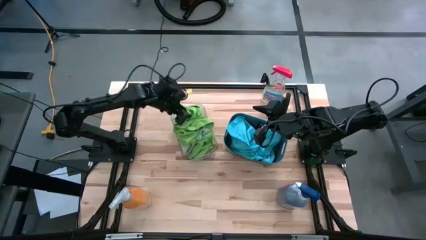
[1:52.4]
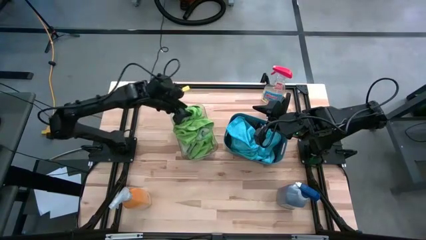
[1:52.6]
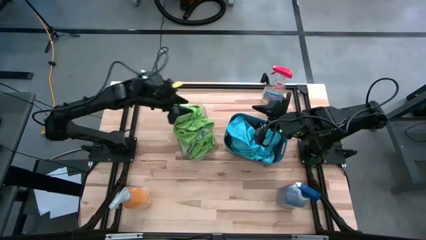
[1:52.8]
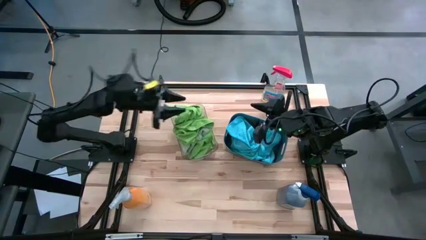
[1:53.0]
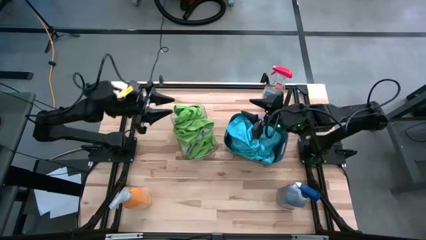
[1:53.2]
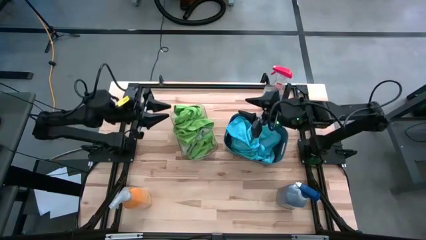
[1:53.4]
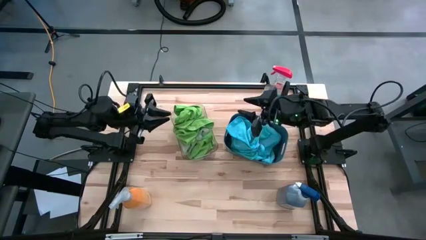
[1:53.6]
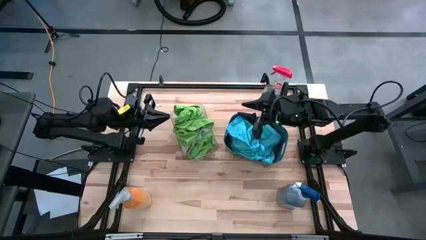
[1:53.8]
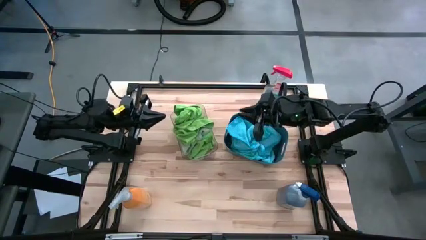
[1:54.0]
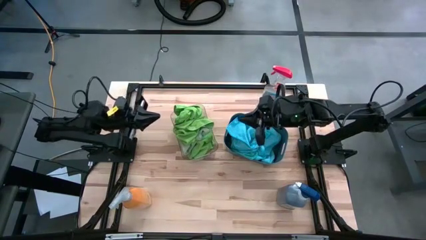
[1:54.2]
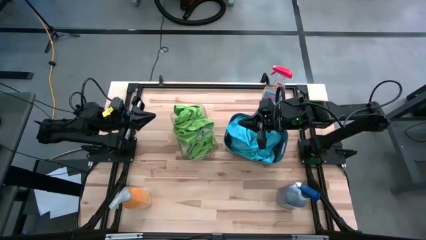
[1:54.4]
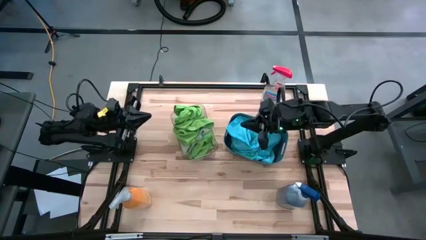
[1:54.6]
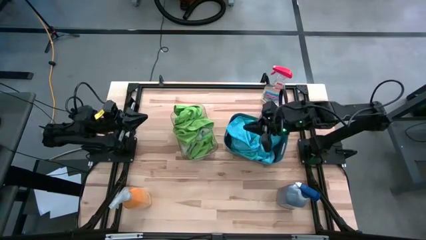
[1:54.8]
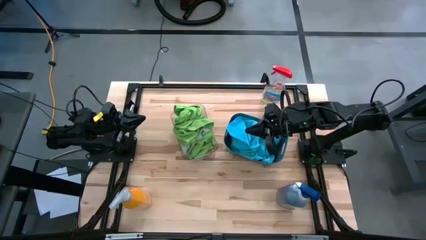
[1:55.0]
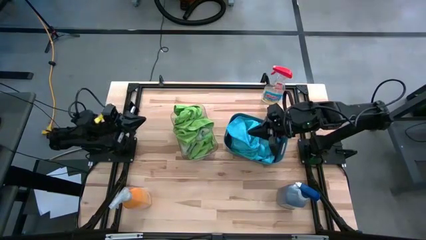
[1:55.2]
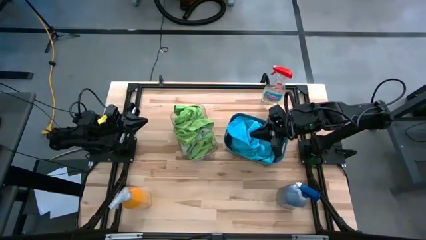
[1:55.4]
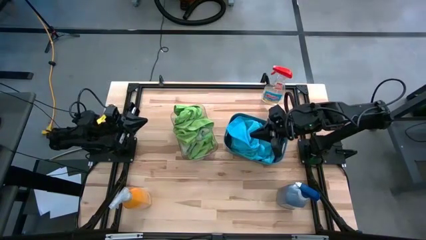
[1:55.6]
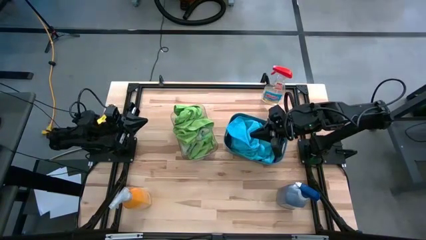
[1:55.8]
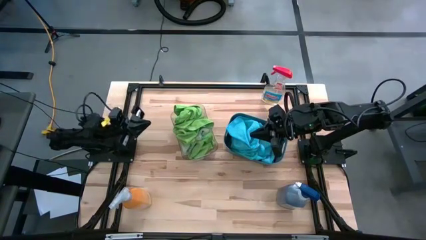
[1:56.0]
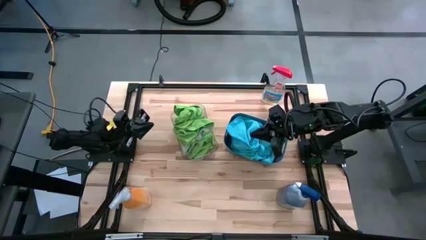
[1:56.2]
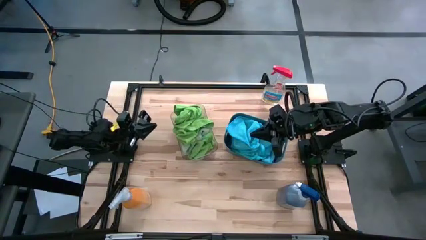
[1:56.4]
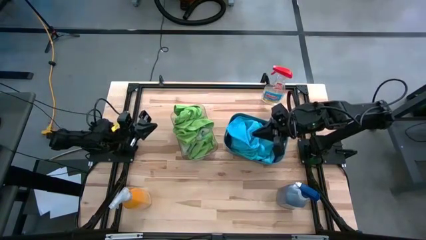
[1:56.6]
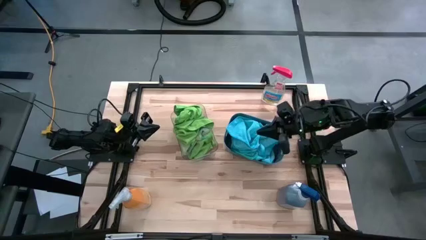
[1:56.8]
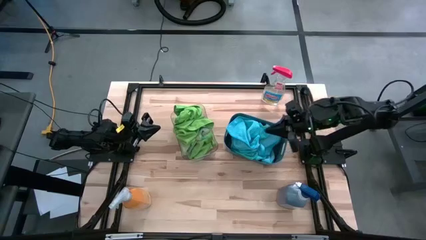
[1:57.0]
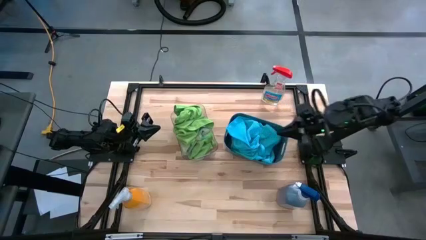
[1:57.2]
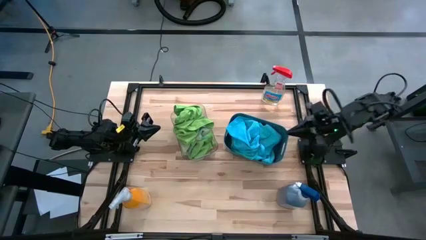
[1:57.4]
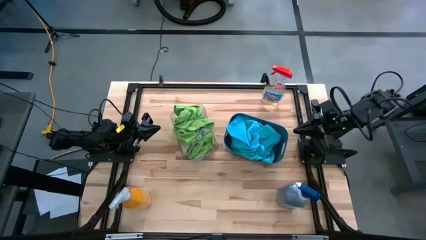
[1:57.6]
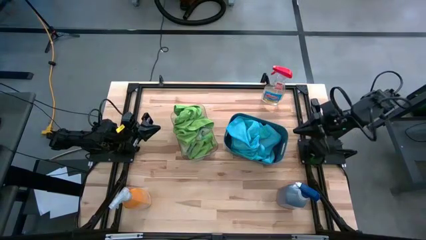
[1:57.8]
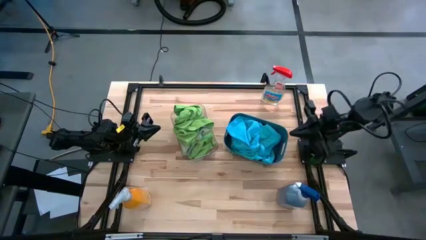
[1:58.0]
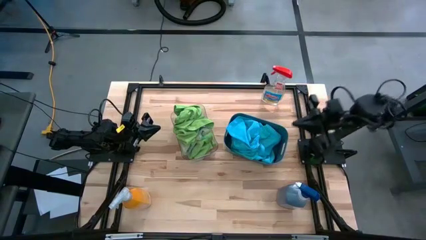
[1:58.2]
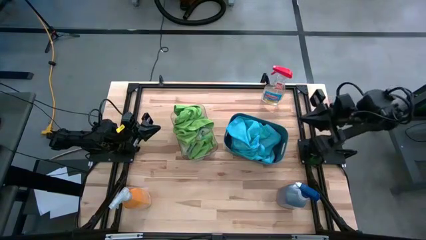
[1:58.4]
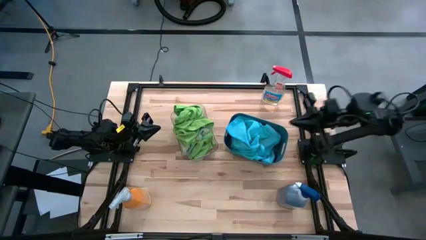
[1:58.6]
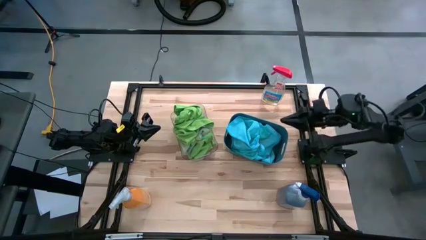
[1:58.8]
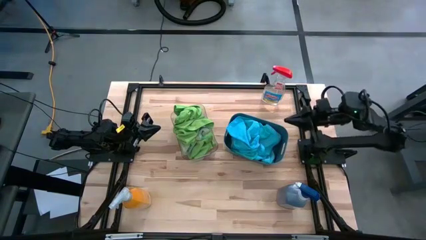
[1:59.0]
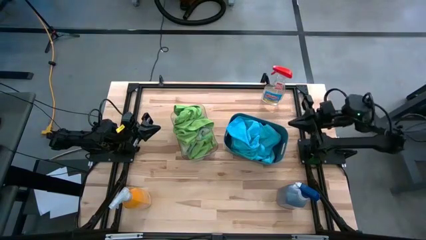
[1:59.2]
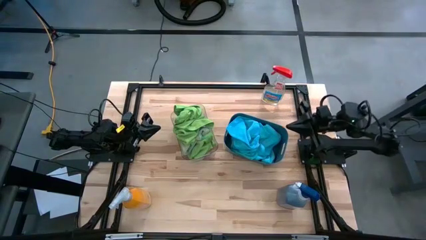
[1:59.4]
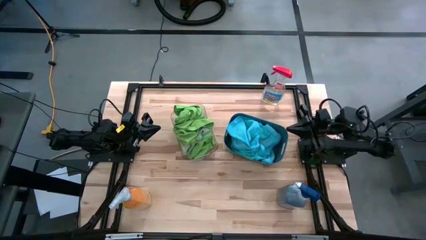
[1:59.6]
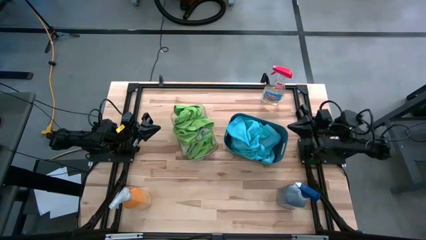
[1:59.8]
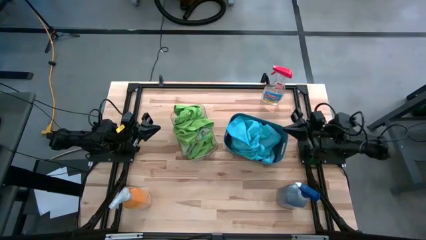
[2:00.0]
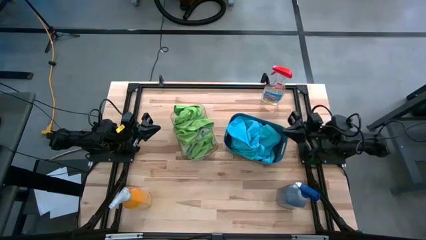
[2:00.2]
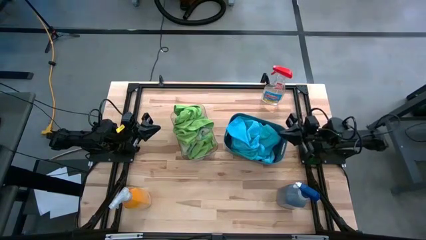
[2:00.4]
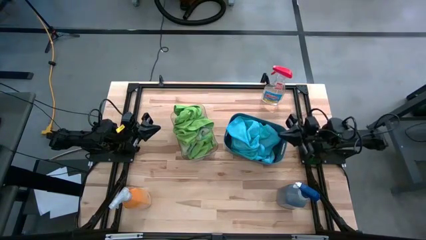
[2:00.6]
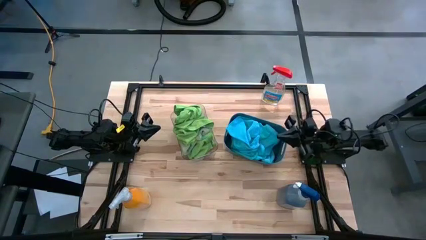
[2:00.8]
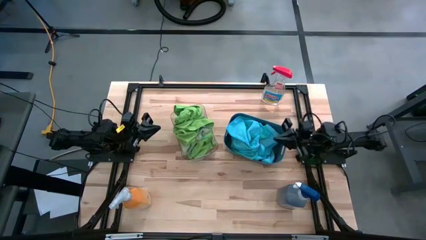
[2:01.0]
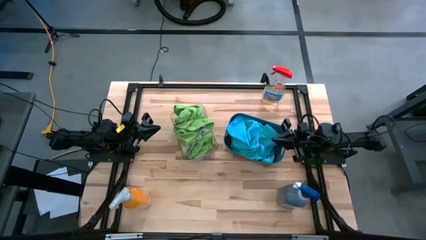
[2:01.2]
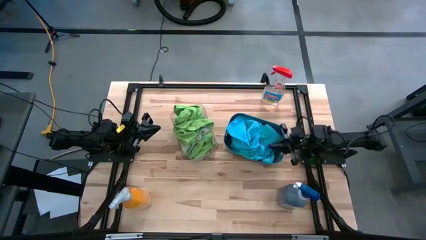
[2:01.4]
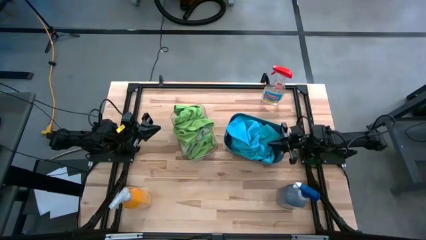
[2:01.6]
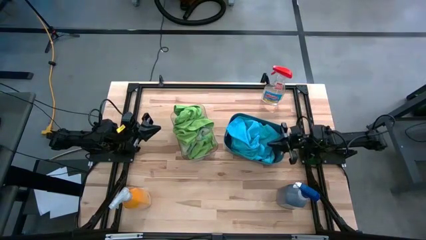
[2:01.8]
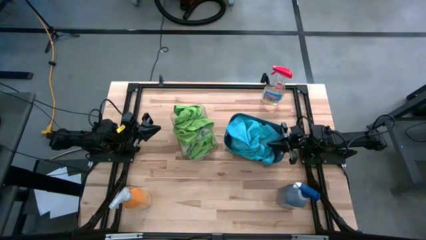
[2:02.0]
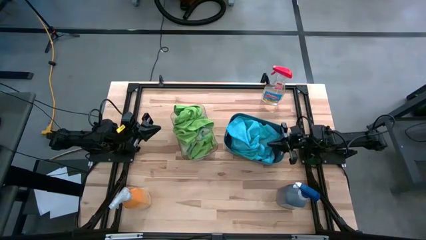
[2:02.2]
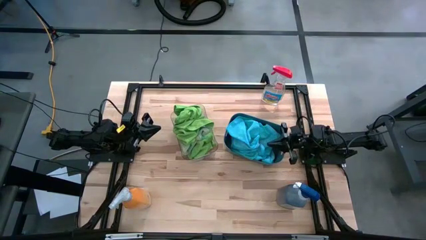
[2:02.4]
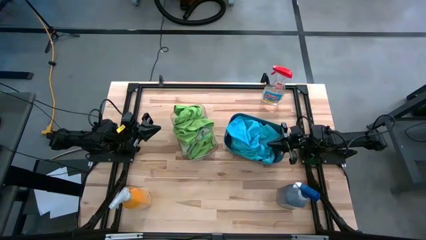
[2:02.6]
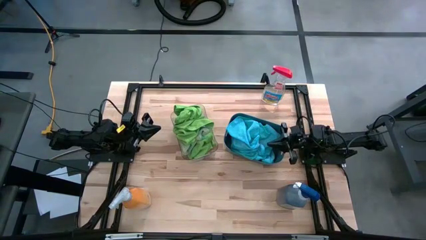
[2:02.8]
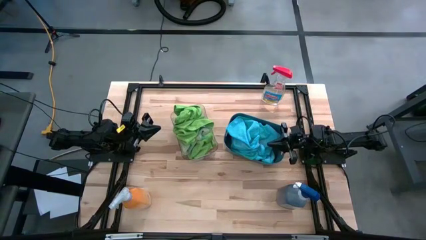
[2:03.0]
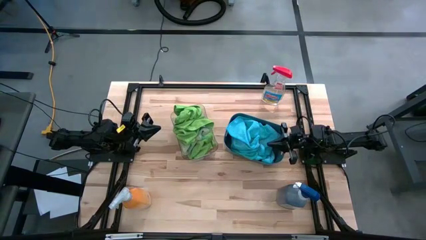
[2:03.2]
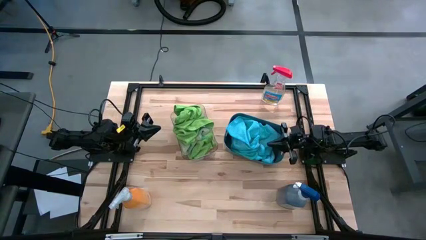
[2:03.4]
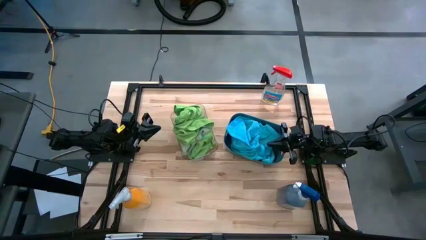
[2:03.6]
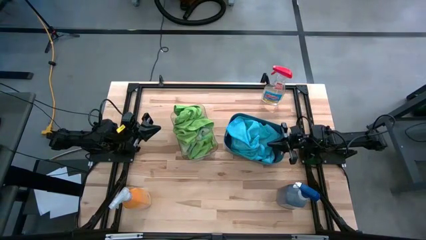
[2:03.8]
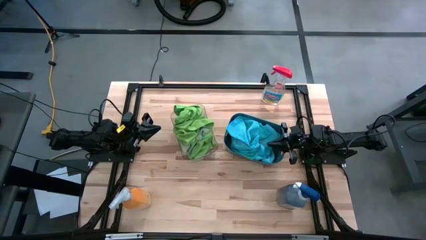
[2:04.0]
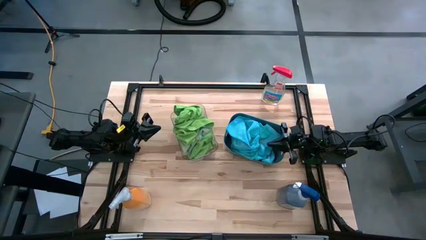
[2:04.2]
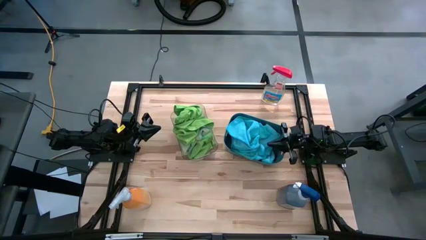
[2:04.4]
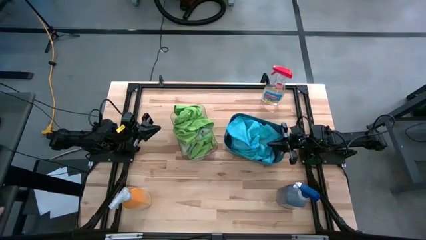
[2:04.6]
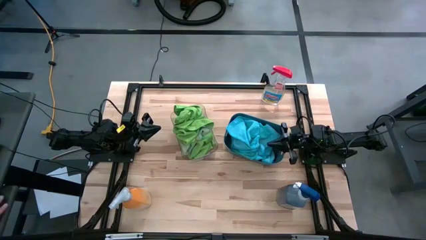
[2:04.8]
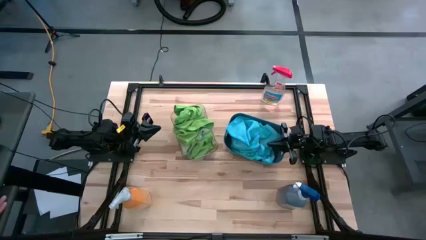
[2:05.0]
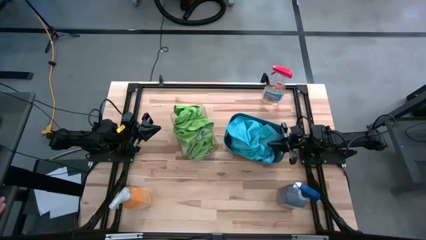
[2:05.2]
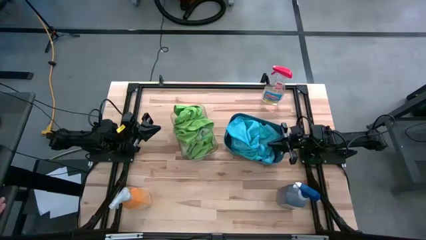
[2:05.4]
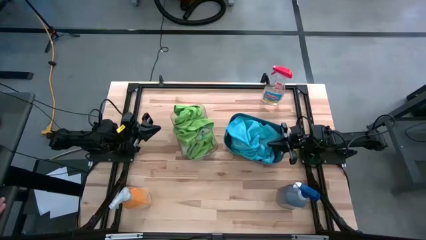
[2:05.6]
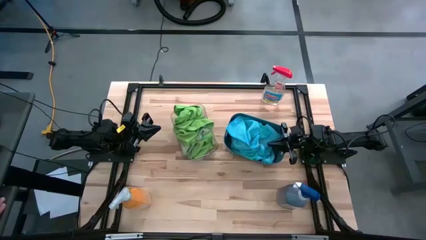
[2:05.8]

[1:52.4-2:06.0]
Task: Sort microfiber towel by color & place in baskets
Return to Home Position
